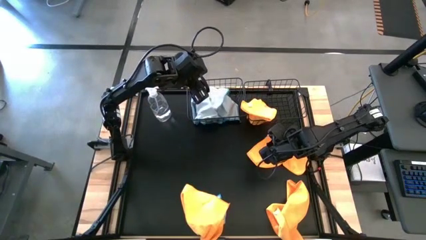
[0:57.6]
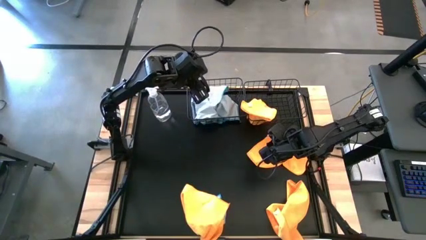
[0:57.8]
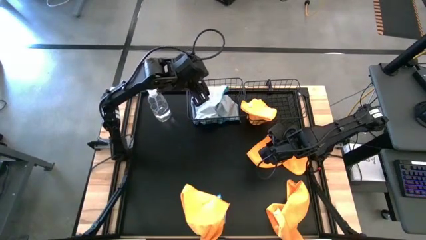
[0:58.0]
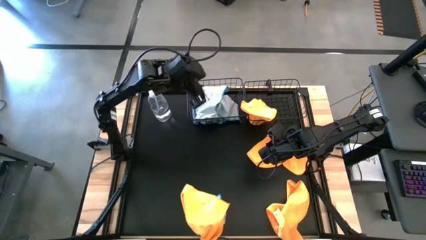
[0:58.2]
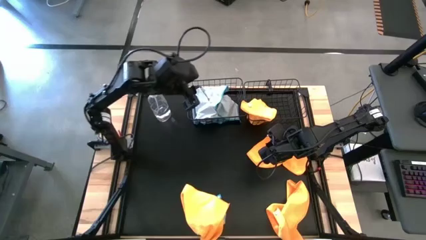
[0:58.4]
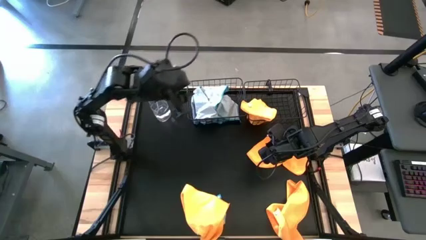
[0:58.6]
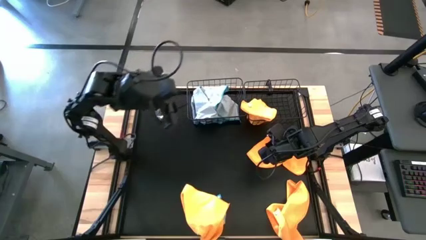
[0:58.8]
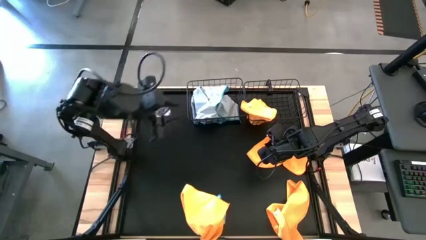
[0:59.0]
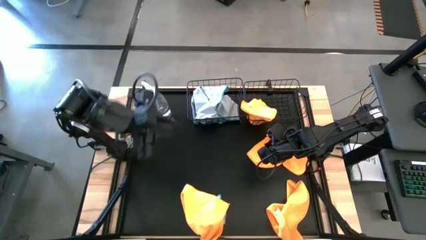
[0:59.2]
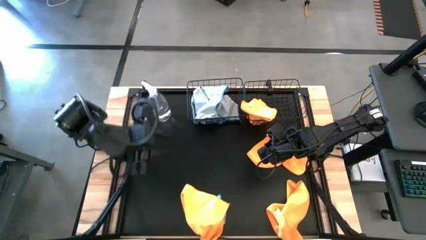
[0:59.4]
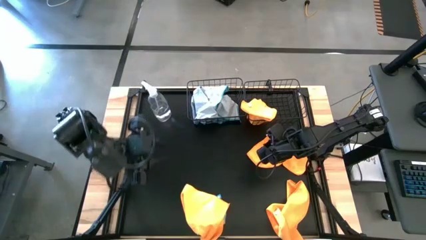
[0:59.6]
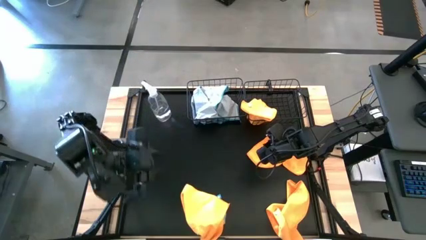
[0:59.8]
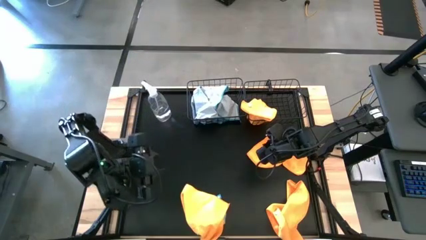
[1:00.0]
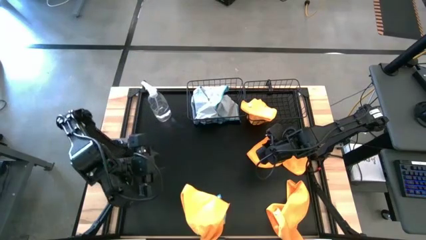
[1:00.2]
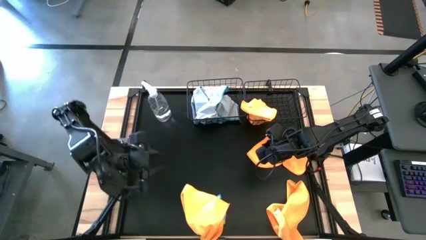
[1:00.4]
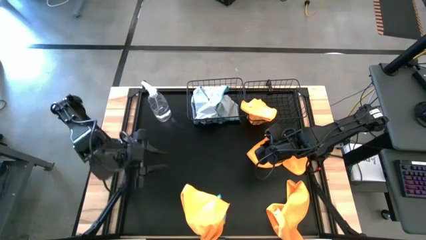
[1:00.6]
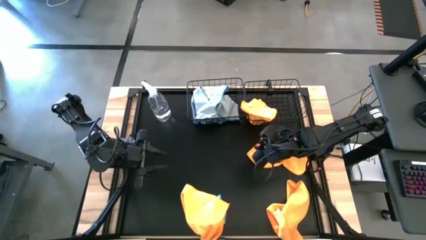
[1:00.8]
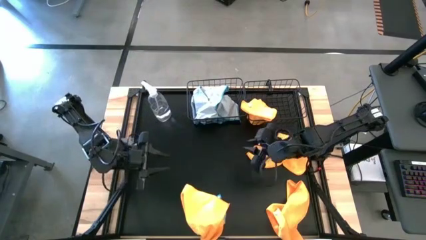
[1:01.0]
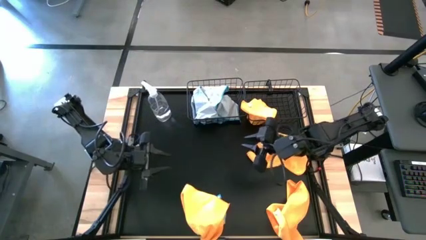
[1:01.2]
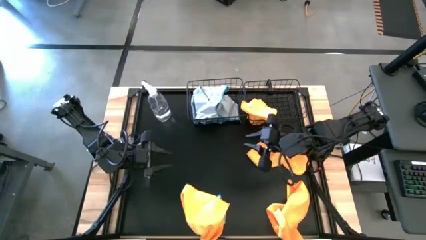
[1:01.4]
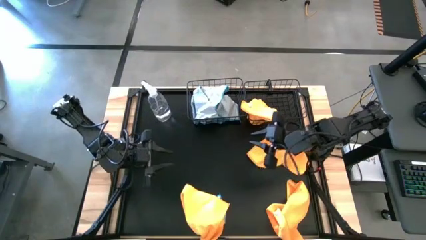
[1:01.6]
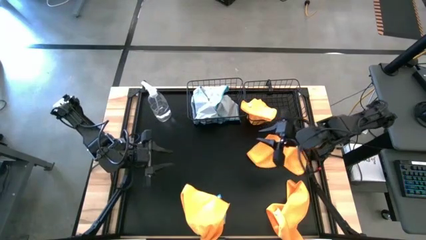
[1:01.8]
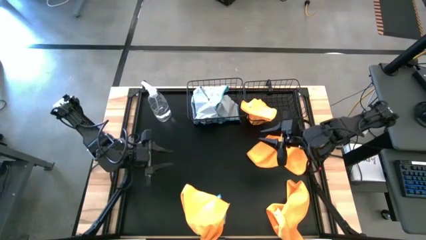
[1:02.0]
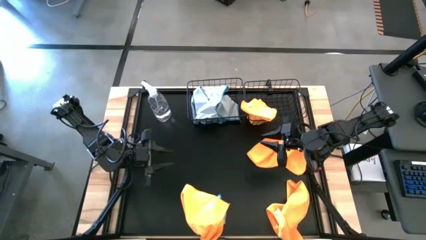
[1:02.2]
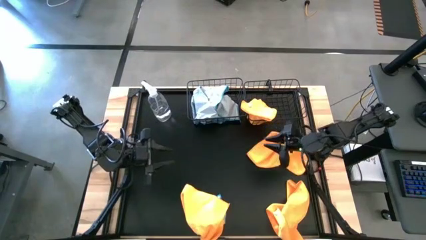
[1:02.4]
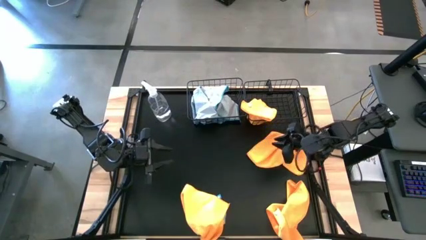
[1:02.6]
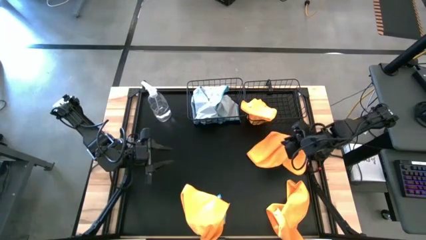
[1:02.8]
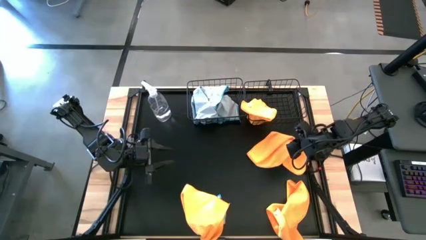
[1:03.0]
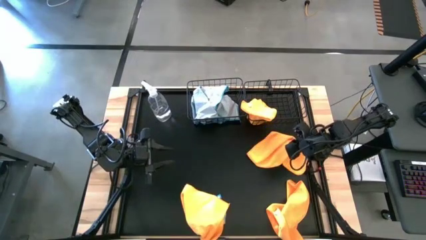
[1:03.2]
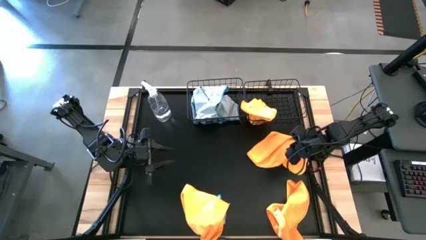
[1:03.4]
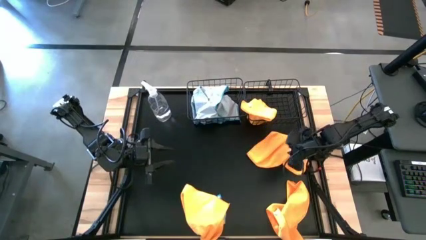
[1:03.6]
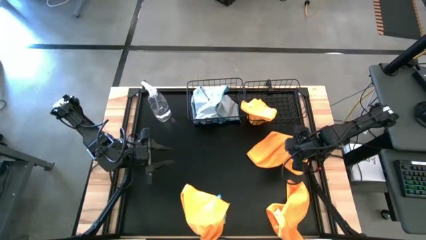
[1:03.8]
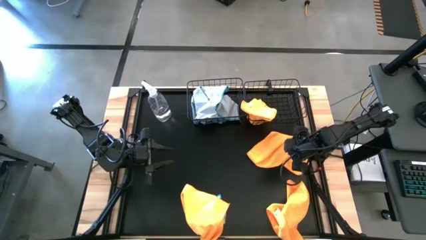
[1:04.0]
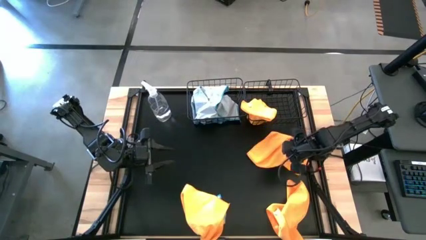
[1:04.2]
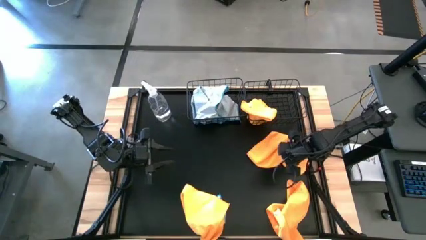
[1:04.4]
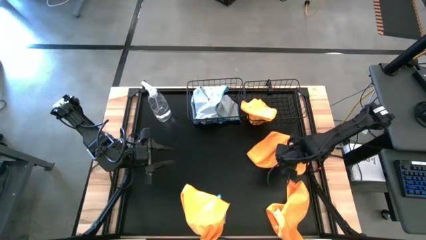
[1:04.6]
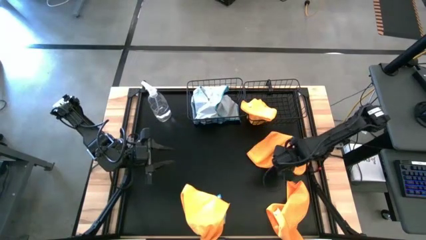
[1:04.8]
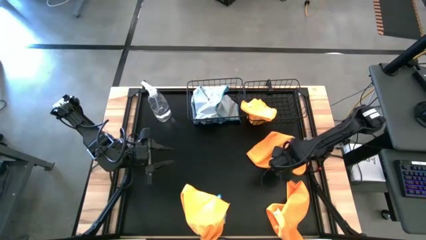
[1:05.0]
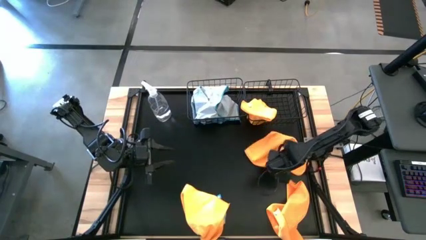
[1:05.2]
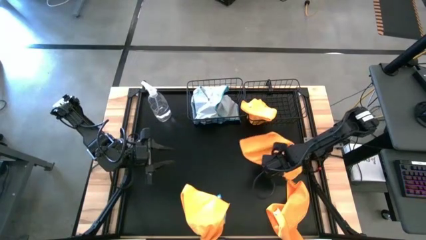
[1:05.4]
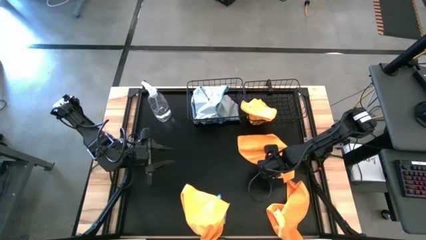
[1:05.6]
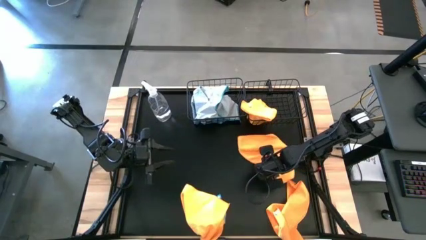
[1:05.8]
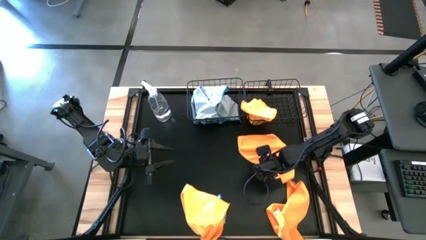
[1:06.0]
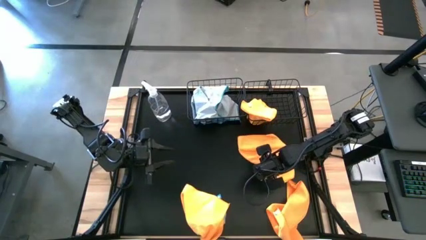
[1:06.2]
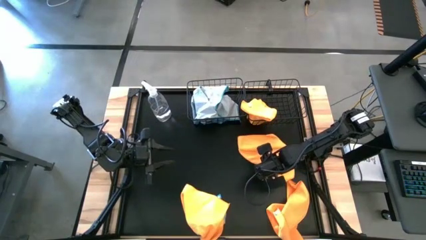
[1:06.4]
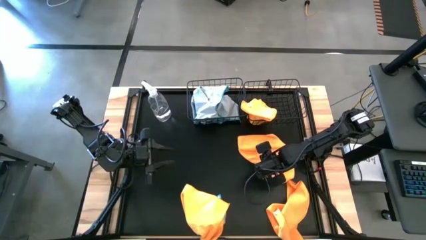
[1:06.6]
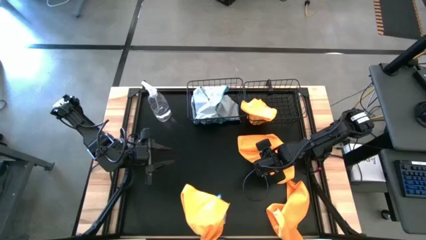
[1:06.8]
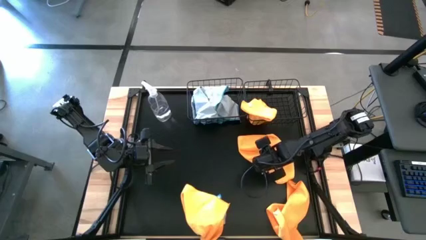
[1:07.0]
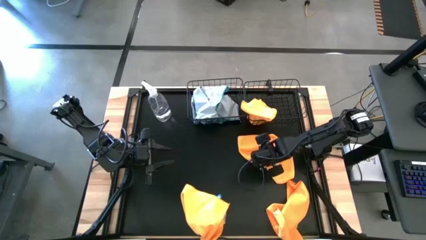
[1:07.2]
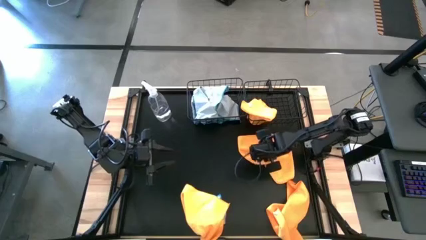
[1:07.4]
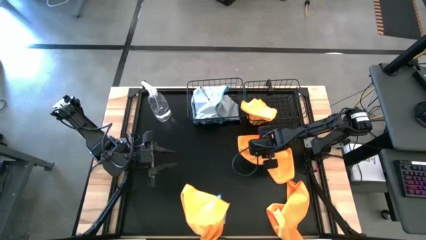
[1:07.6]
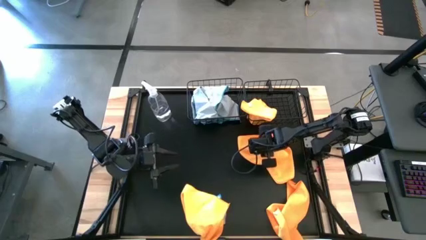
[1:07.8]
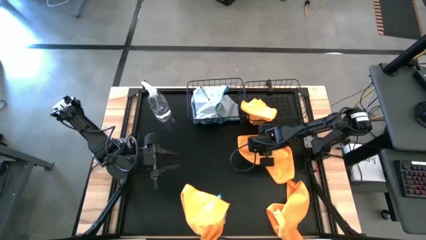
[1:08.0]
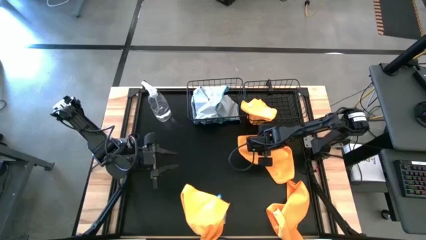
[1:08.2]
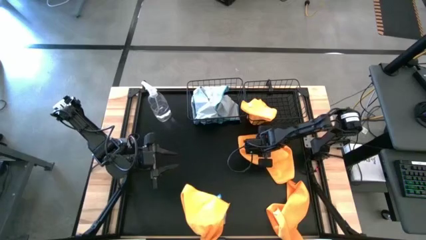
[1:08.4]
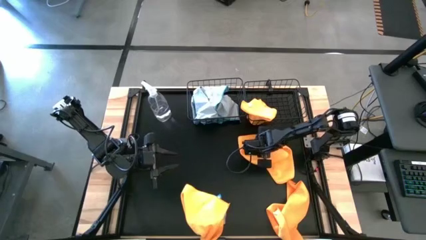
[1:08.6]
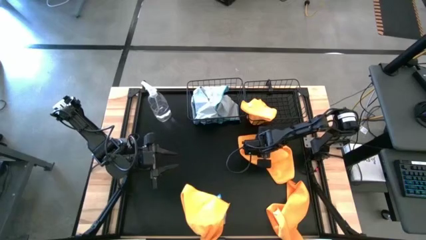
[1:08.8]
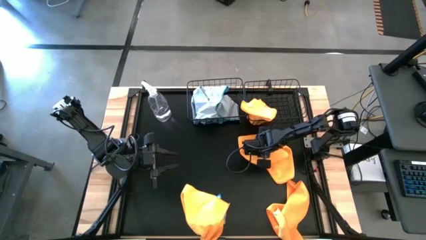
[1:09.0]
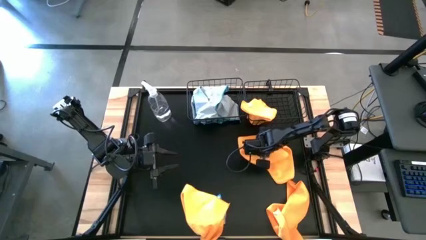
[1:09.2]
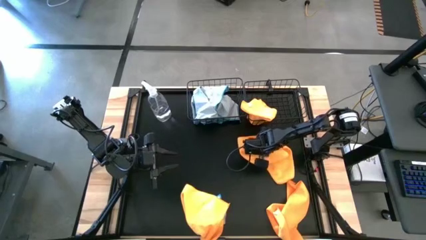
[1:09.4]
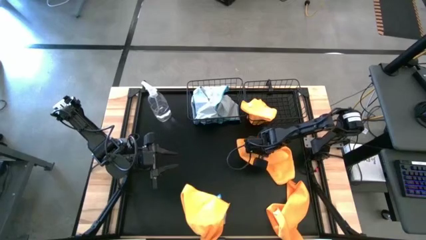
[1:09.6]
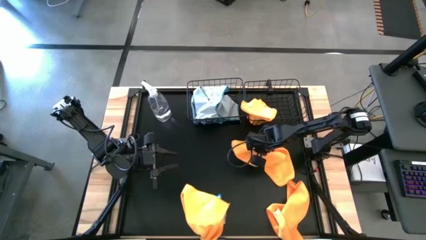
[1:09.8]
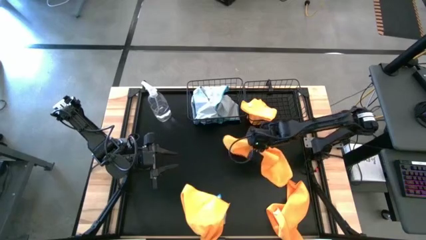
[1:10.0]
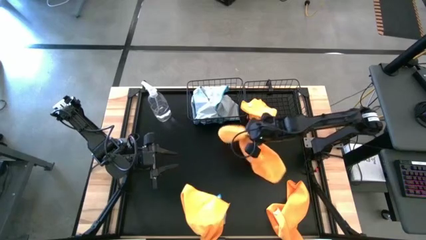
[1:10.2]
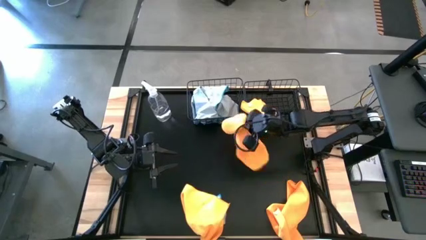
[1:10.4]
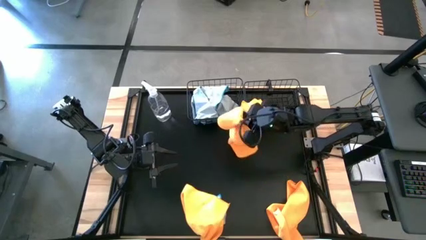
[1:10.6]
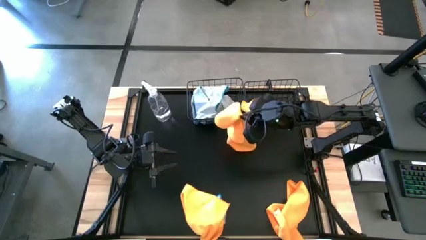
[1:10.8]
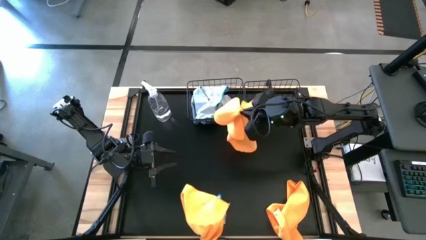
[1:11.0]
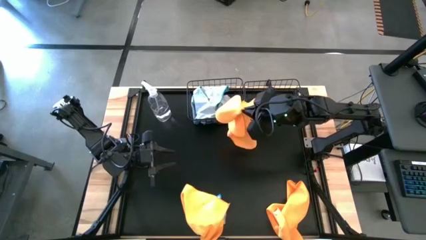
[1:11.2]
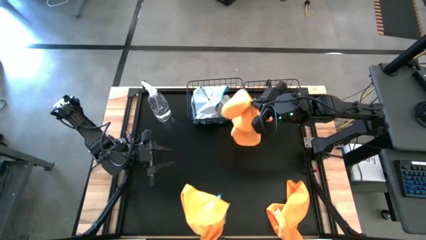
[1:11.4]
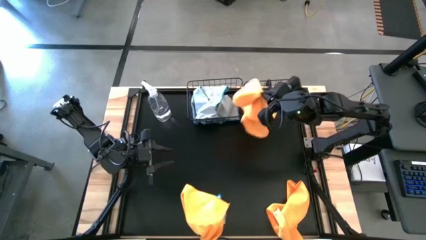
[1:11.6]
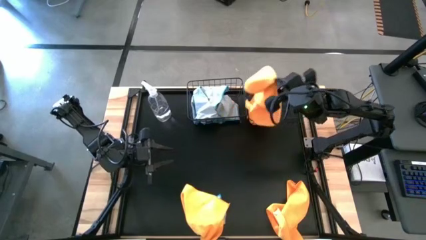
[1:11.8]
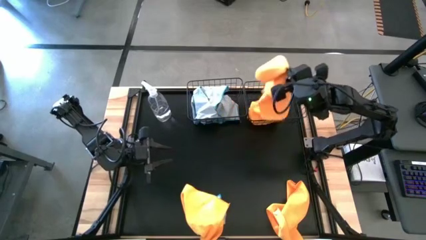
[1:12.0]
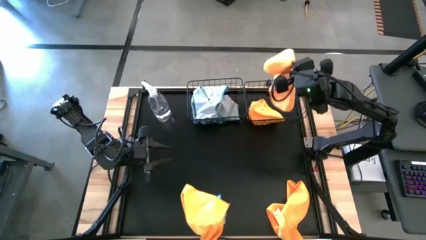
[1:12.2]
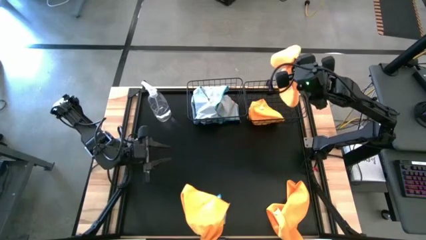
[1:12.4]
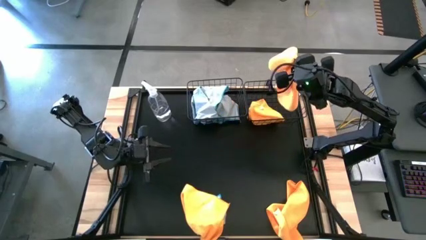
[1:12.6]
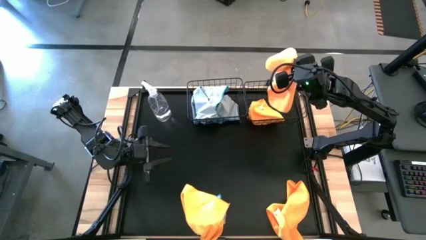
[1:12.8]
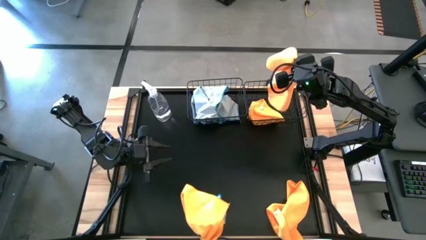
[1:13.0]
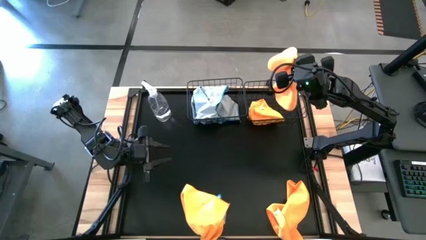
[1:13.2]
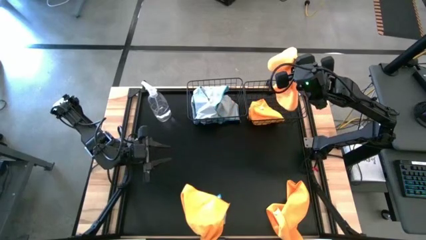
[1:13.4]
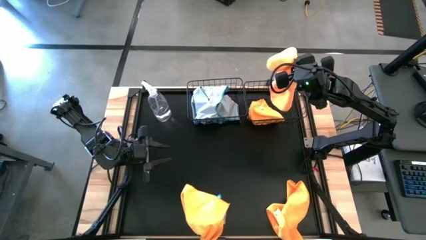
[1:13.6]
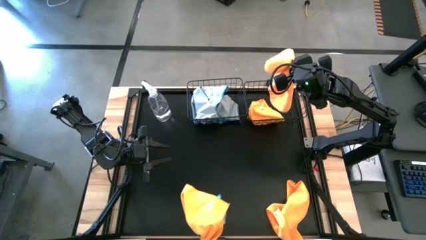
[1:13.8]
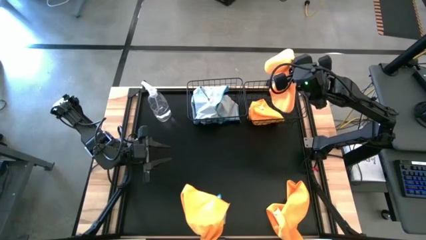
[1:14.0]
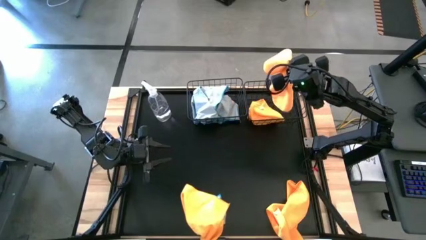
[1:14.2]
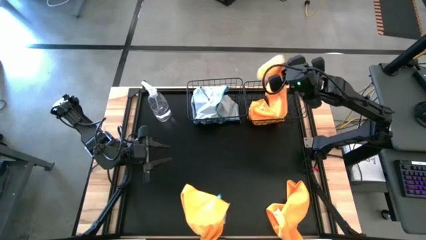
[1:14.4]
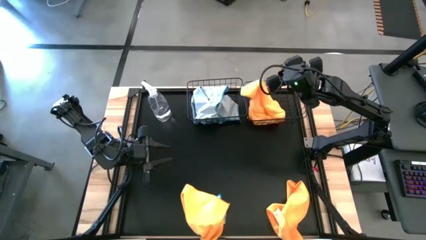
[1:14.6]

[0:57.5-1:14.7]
Task: Sort microfiber towel by color & place in baskets
Put the top right orange microfiber towel into the right black wire basket
